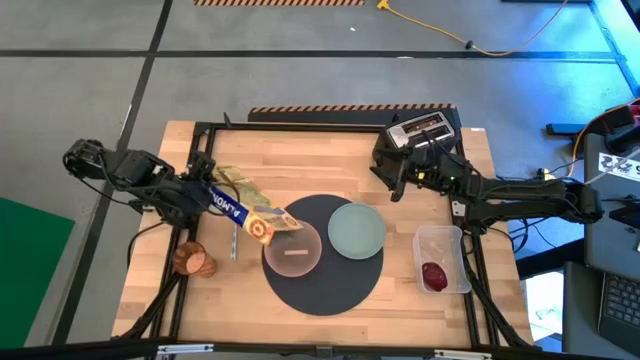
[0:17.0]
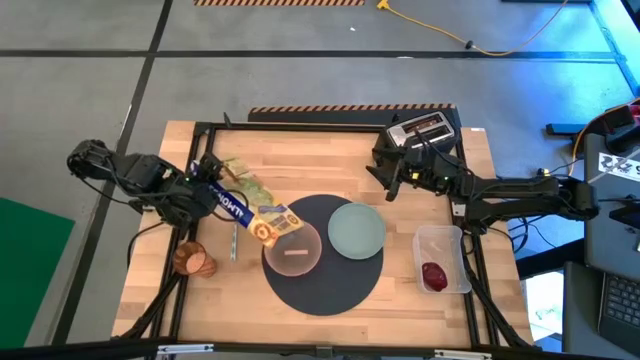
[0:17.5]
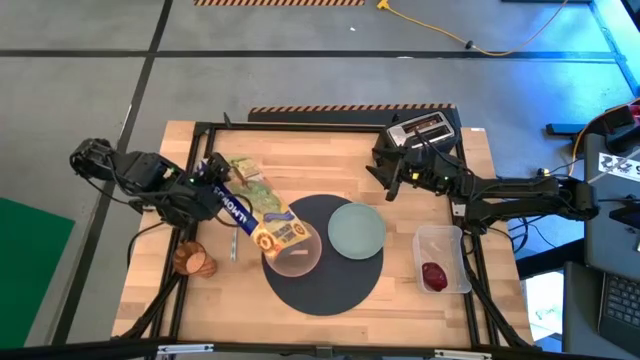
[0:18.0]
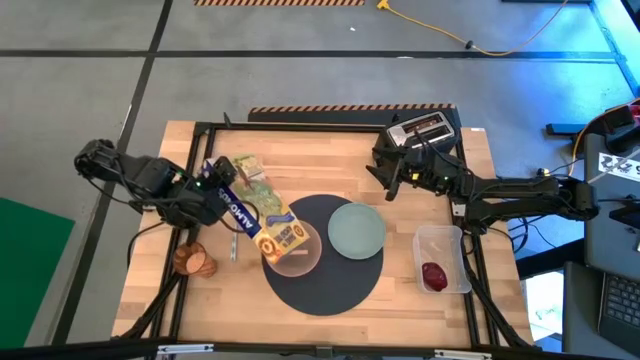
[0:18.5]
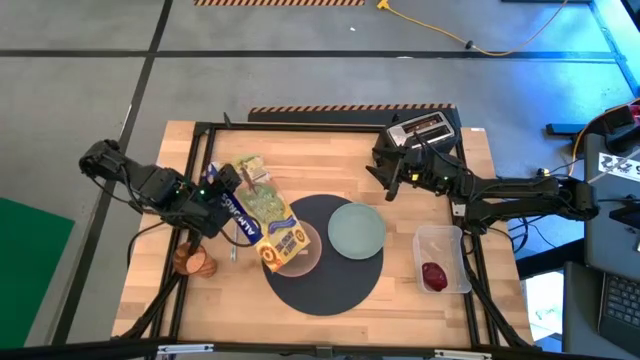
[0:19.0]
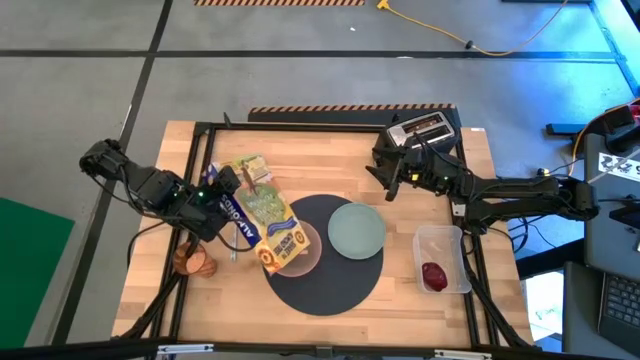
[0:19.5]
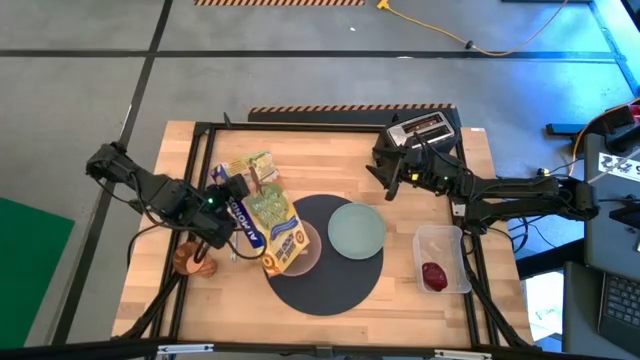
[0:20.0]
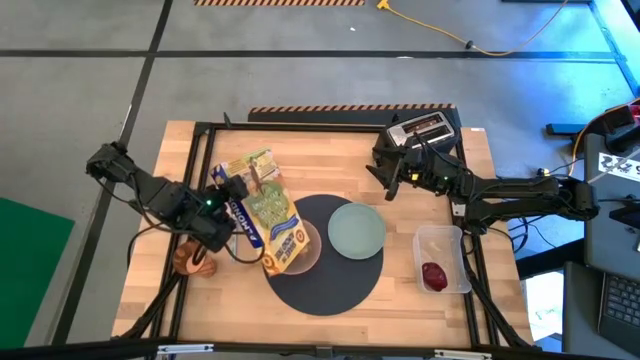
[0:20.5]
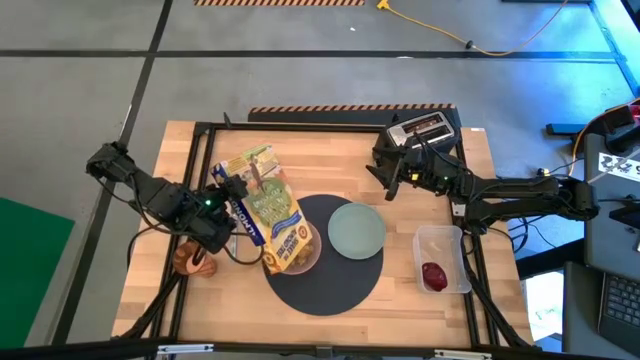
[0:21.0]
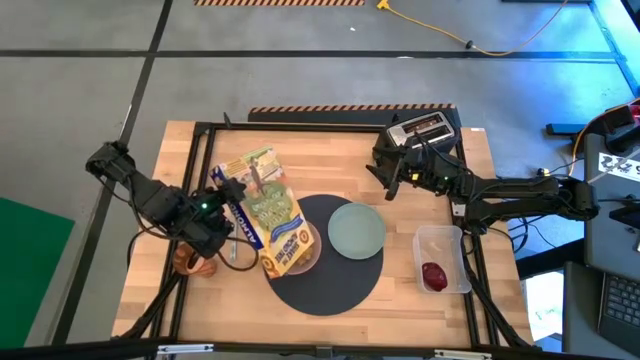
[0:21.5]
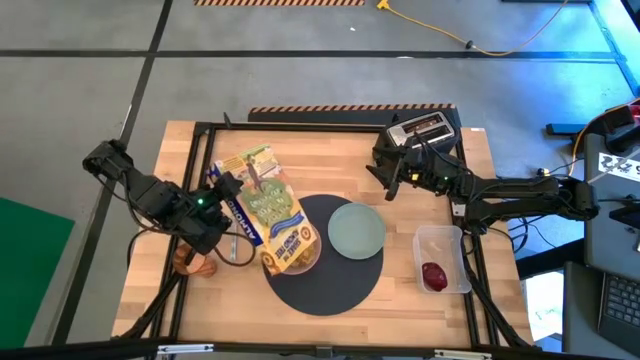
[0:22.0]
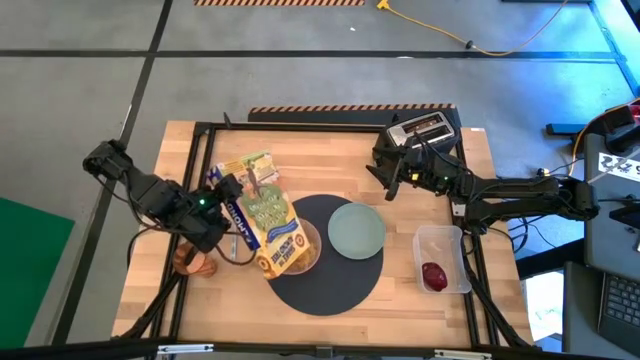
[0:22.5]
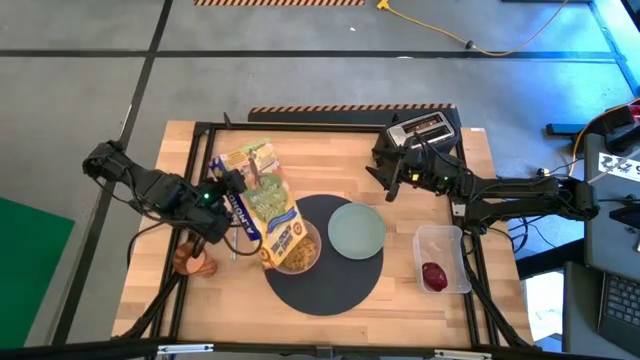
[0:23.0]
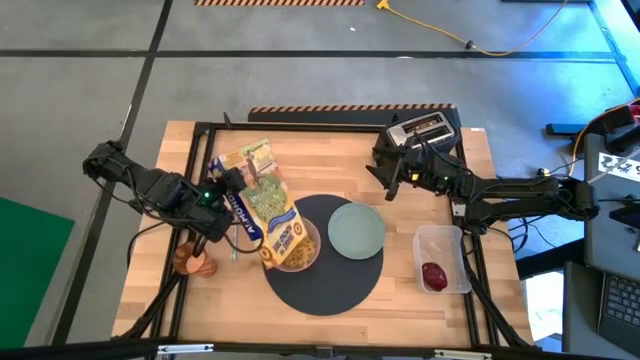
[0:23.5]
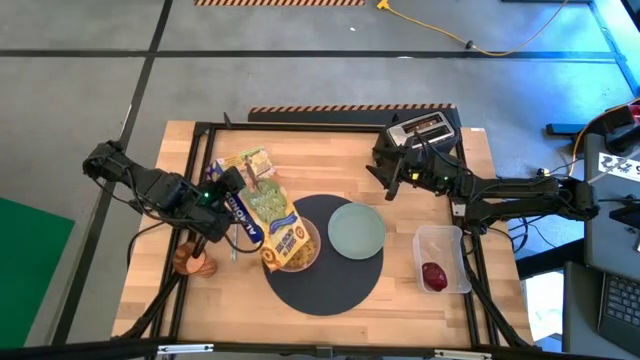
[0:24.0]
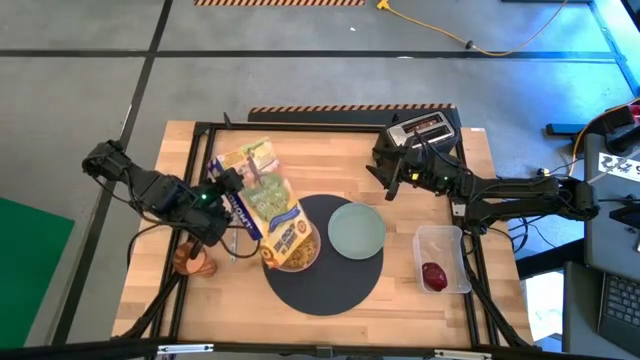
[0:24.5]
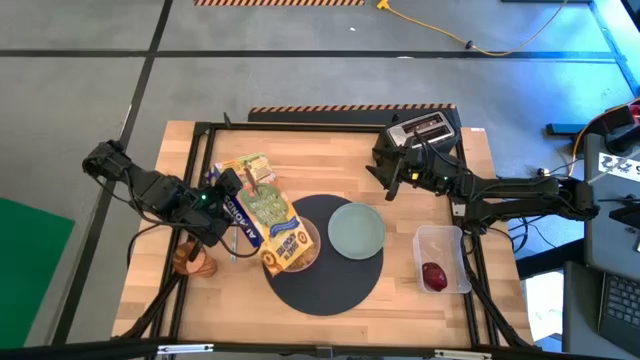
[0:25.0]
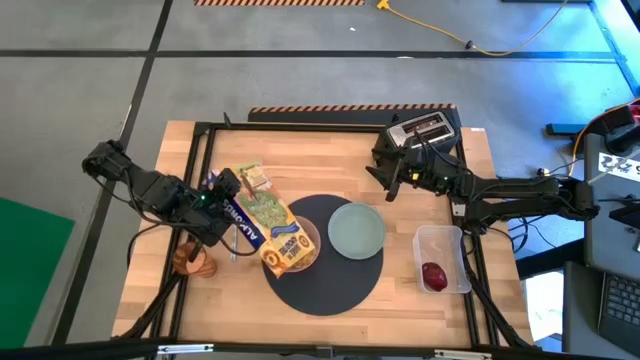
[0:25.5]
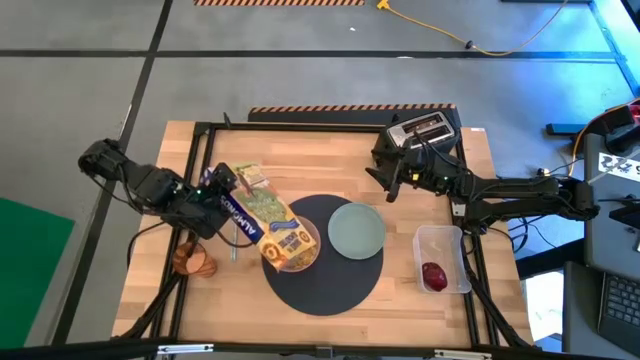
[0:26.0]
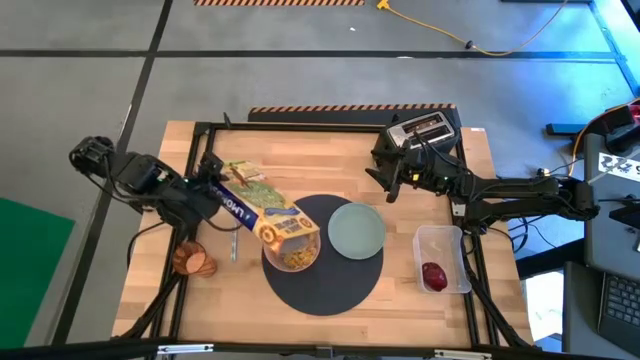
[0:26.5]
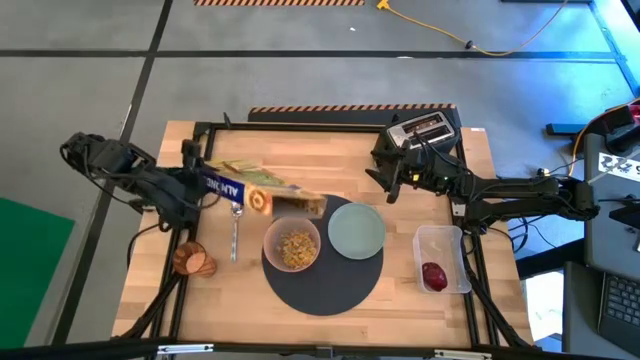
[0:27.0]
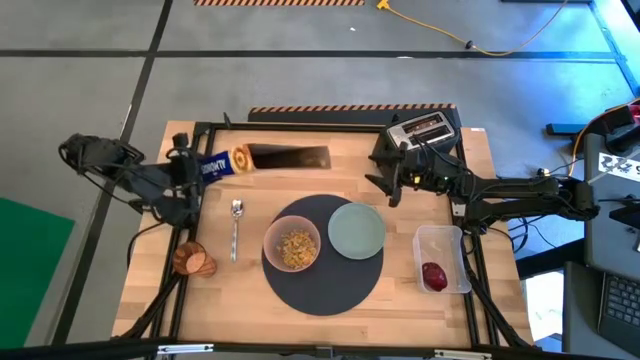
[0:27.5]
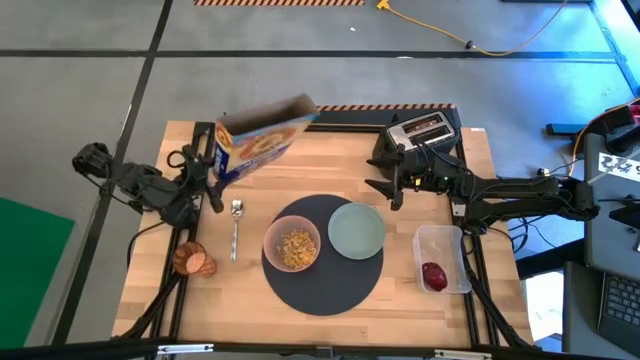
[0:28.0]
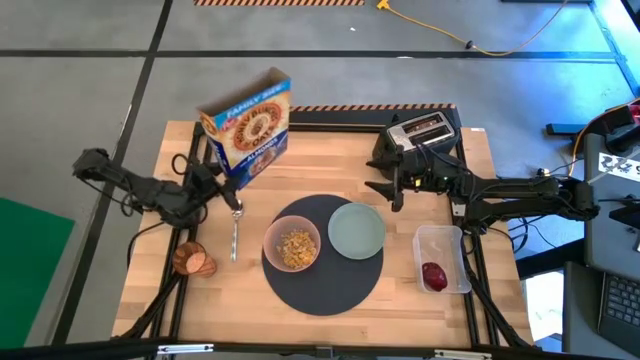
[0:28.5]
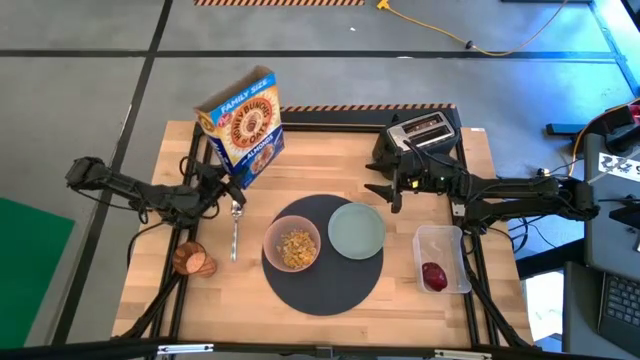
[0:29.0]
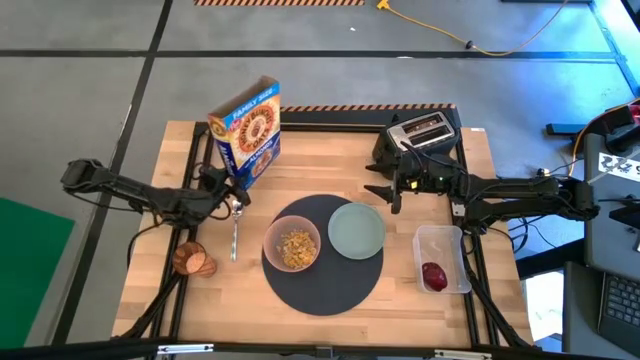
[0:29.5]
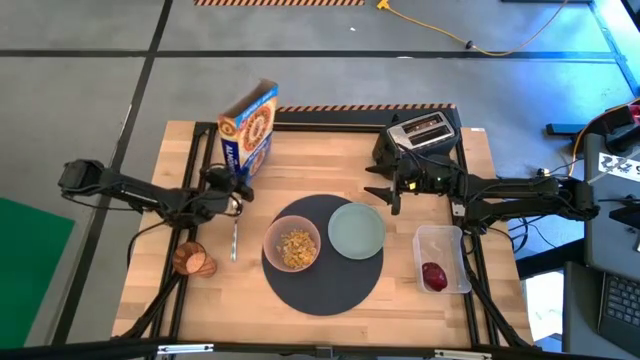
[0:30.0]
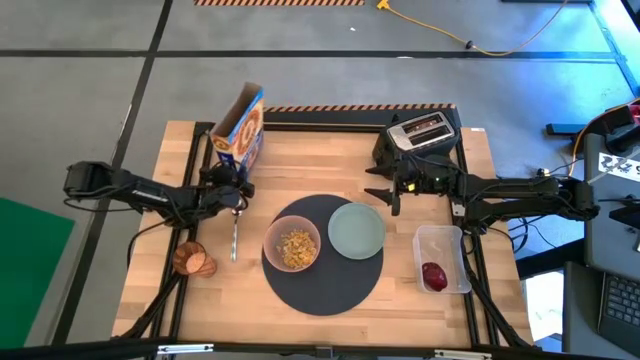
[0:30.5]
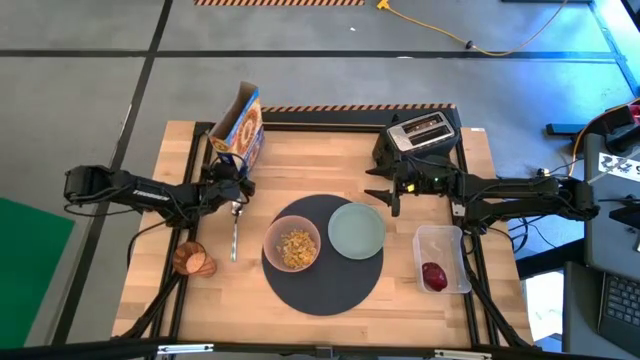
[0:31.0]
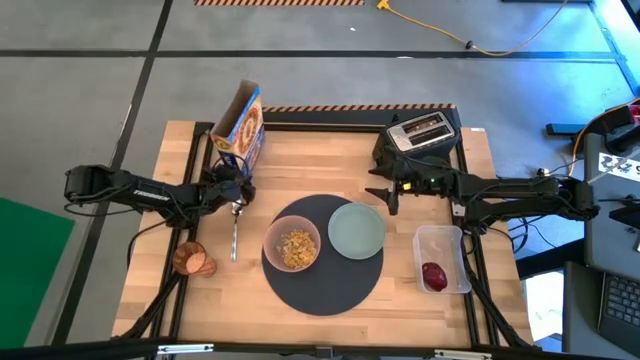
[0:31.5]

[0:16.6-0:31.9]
Task: Arrange a breakfast setting
Pour the cereal from the box into the orange bowl

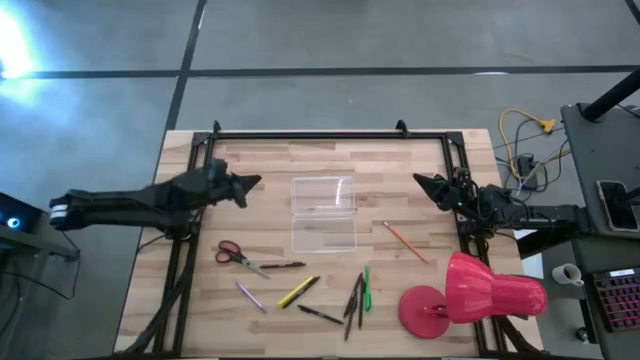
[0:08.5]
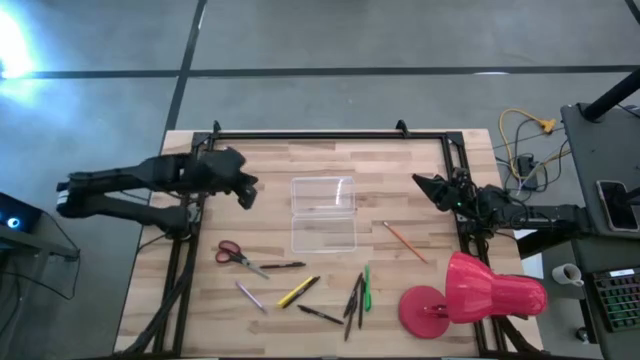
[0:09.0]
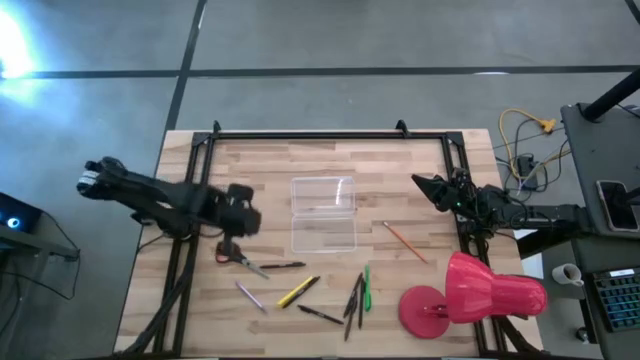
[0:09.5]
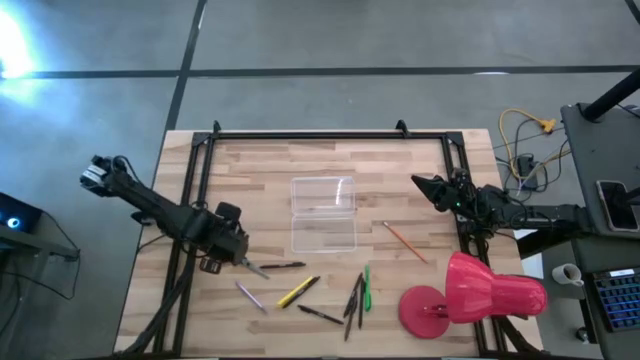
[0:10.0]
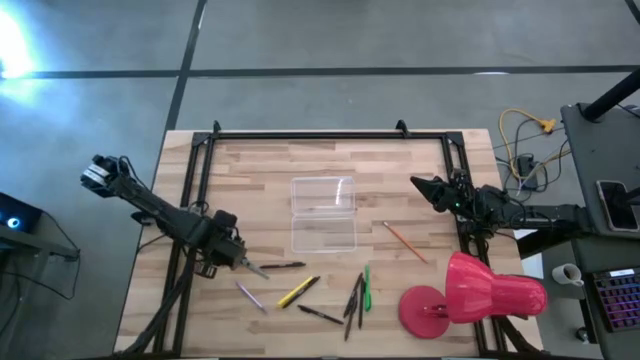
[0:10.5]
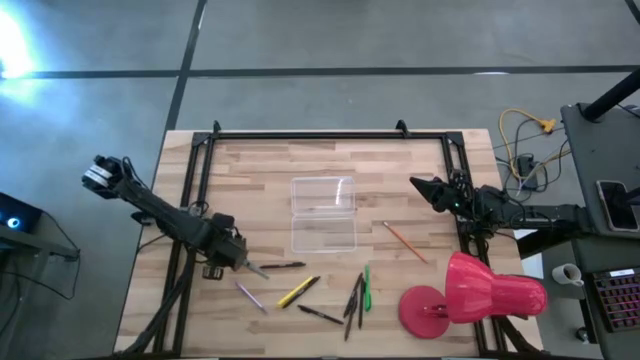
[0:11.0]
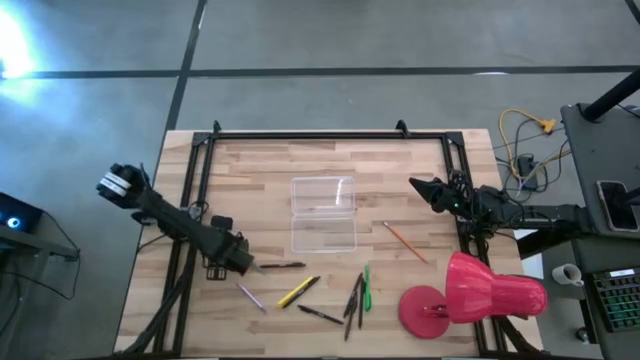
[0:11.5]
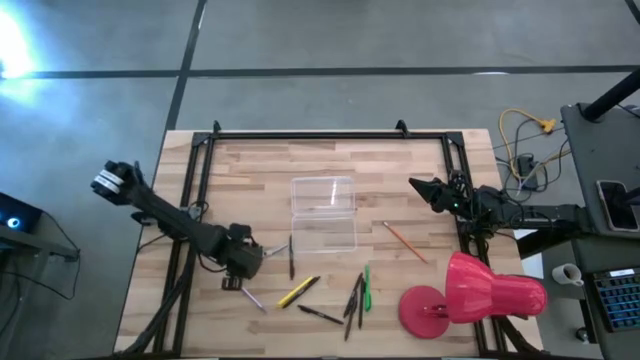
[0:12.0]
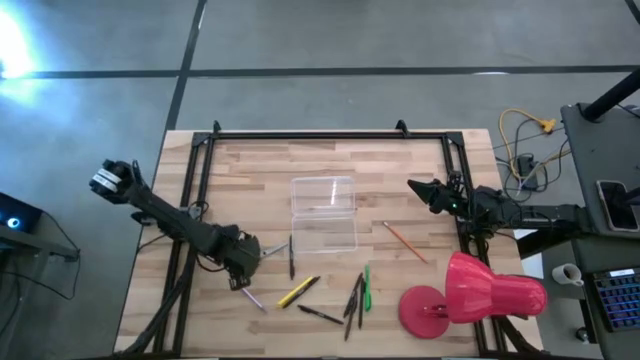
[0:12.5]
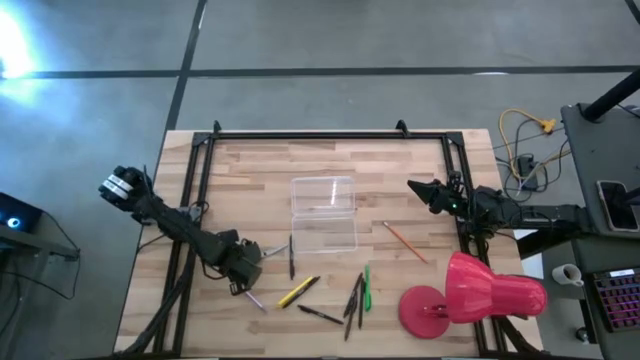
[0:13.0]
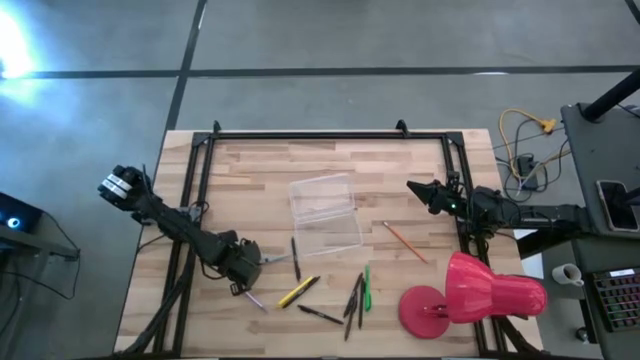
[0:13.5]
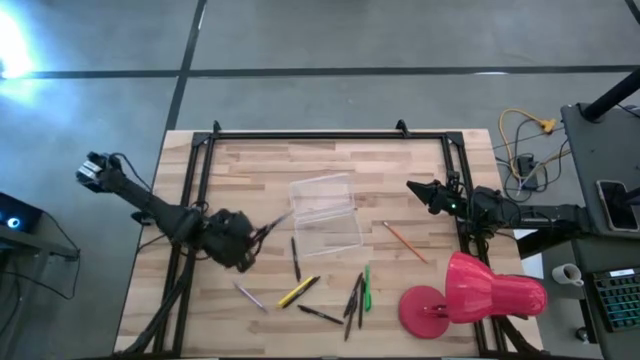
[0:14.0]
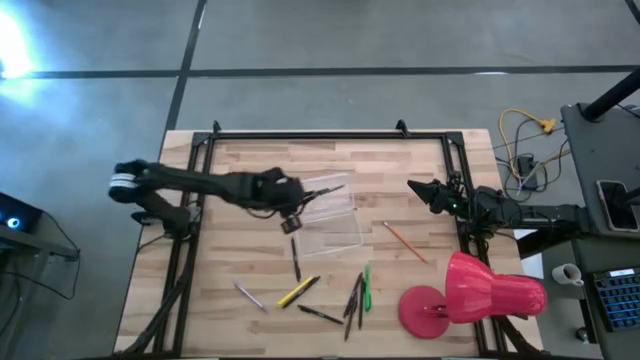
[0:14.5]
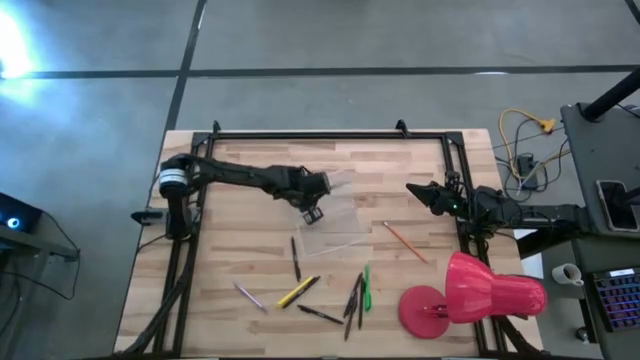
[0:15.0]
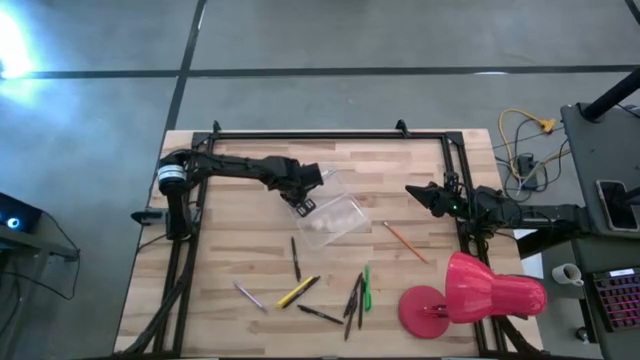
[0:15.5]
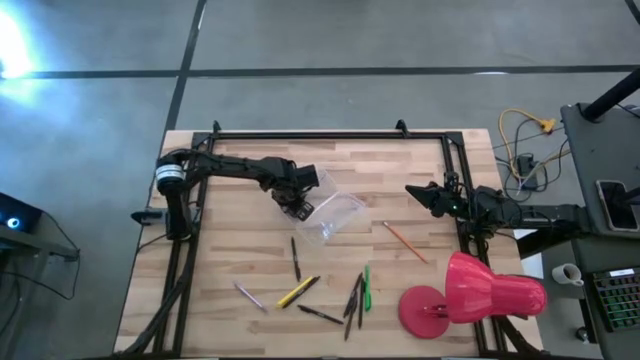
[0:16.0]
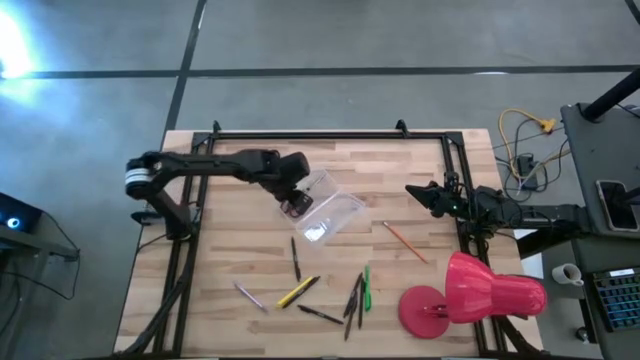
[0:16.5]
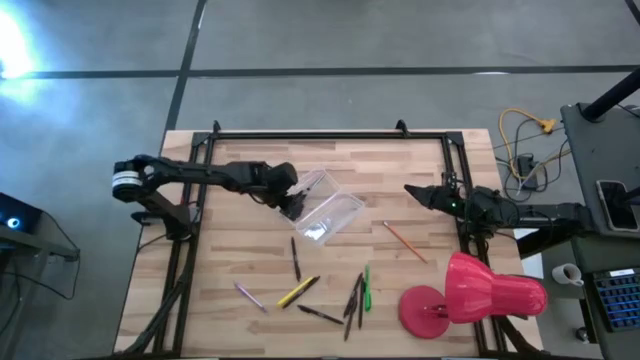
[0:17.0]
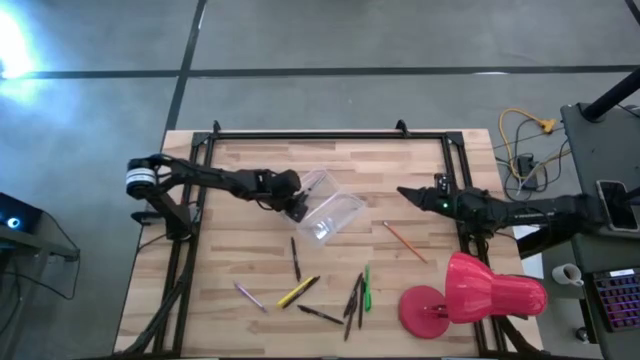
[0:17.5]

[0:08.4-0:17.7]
Task: Pick & place school supplies into a supply box
Put the black scissors into the transparent supply box
